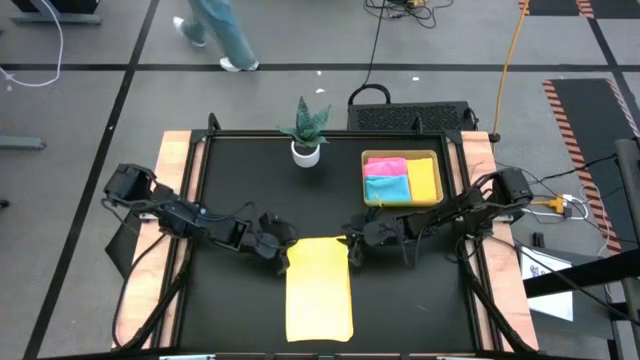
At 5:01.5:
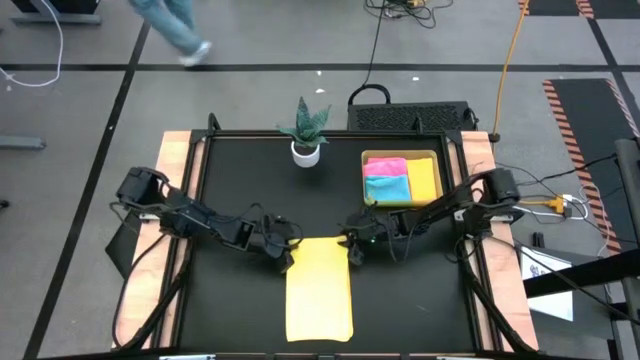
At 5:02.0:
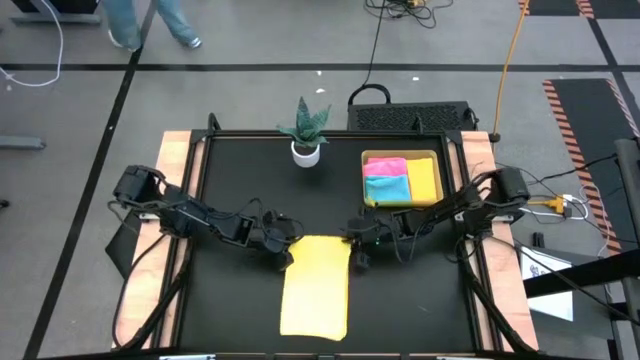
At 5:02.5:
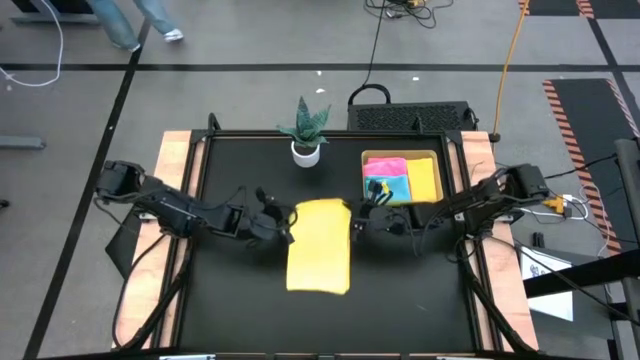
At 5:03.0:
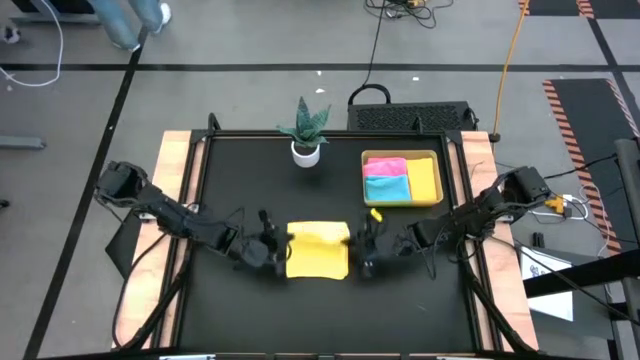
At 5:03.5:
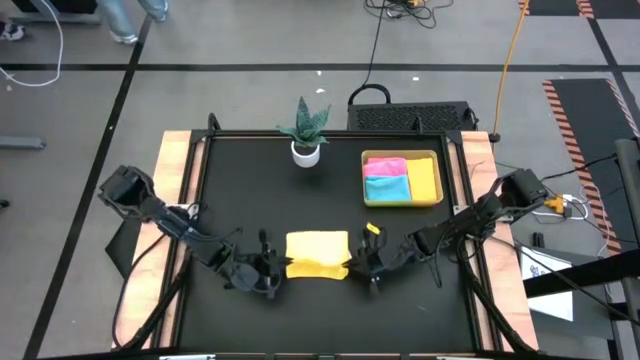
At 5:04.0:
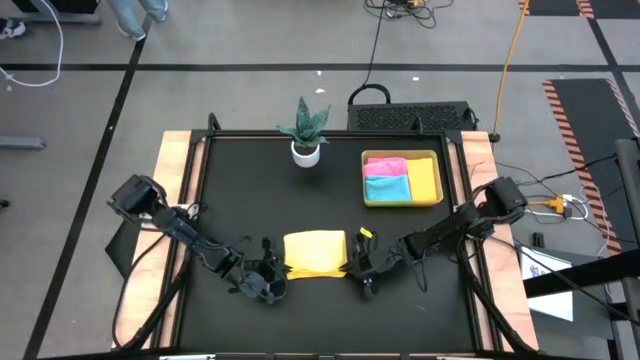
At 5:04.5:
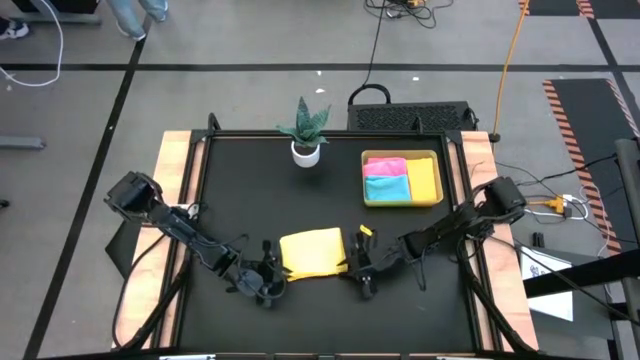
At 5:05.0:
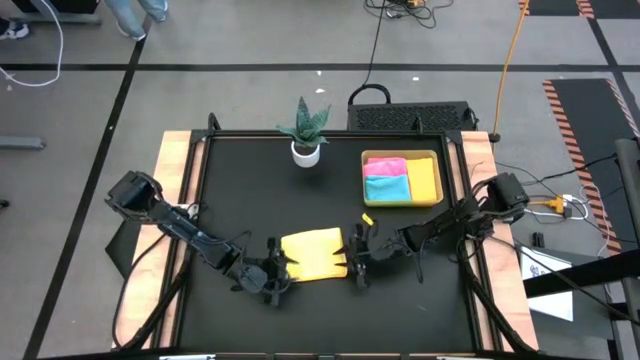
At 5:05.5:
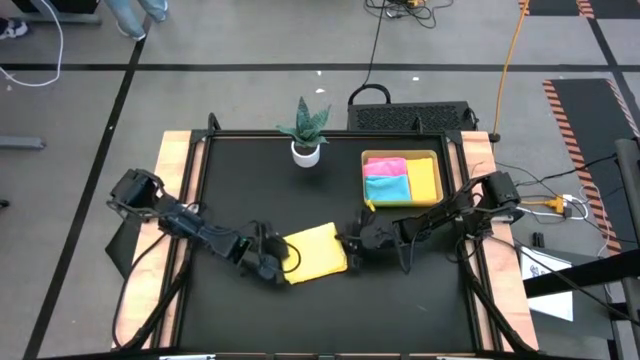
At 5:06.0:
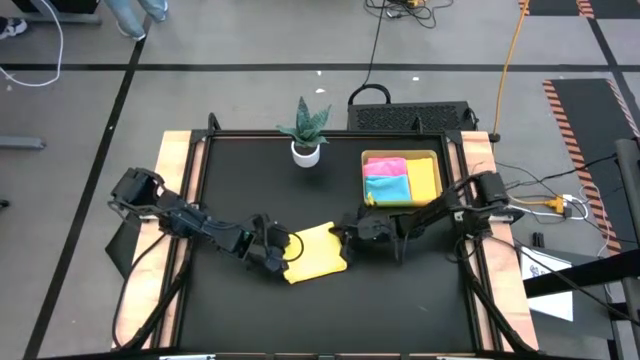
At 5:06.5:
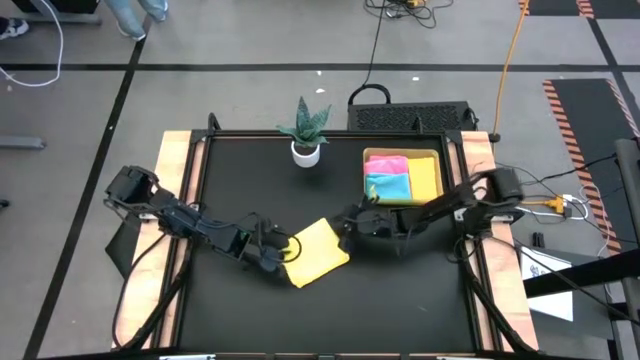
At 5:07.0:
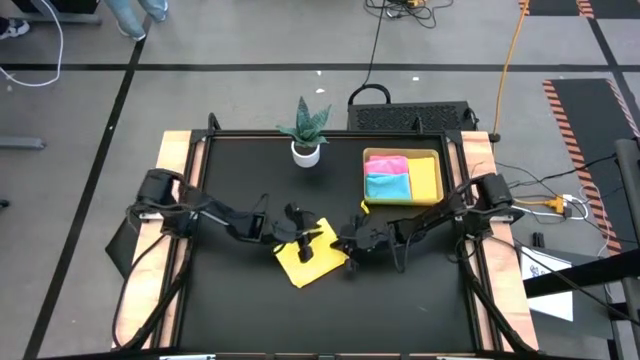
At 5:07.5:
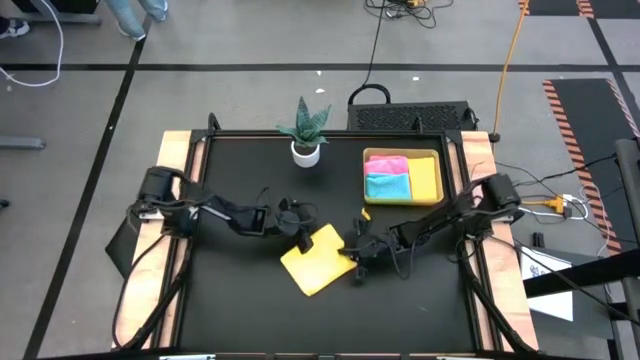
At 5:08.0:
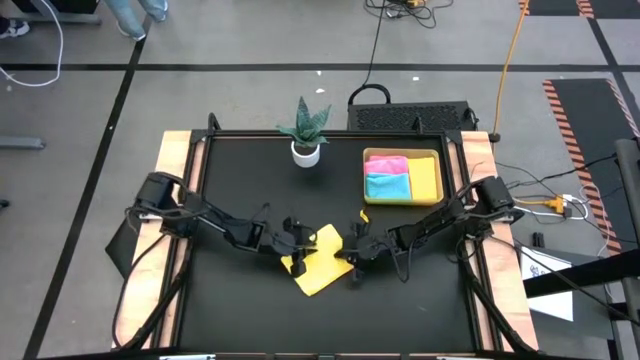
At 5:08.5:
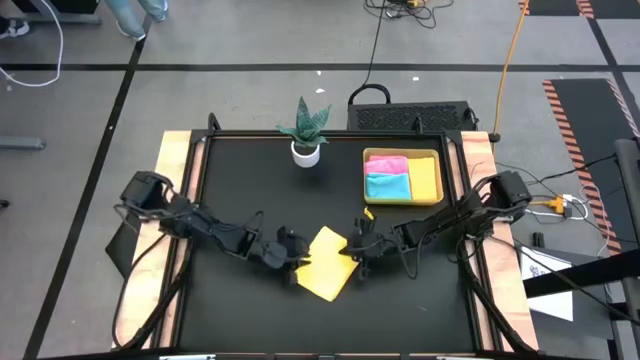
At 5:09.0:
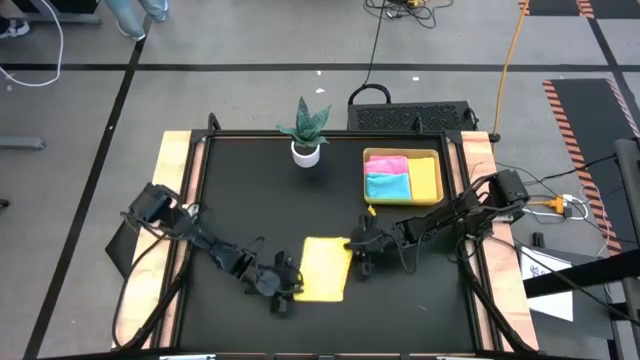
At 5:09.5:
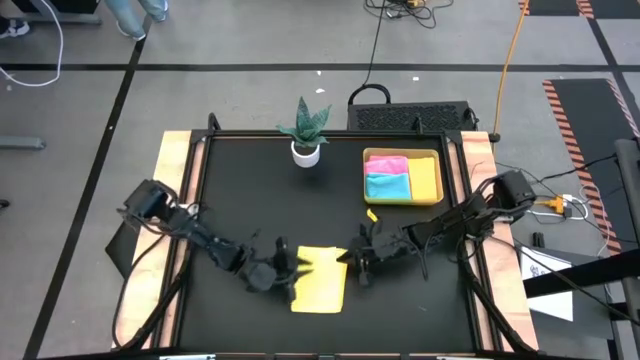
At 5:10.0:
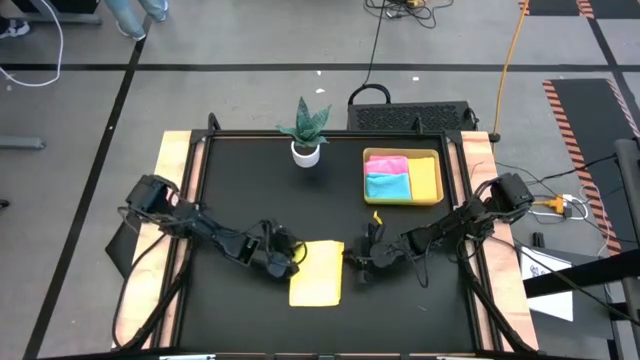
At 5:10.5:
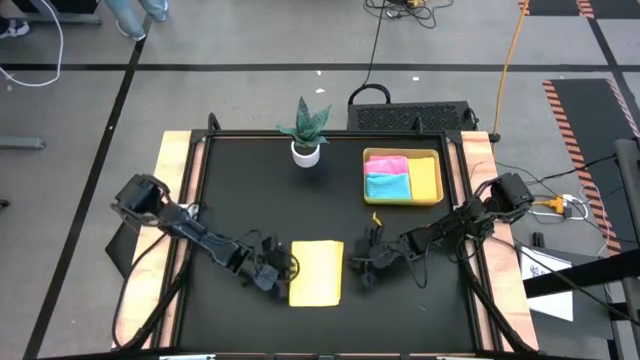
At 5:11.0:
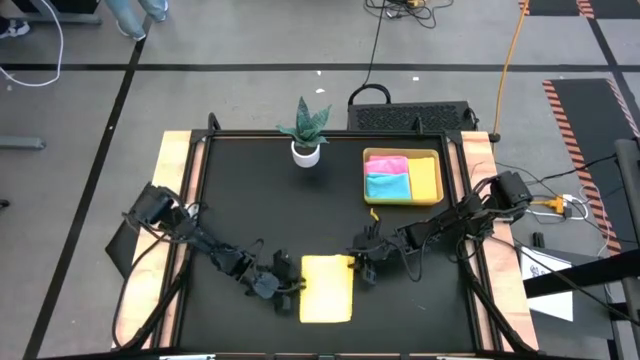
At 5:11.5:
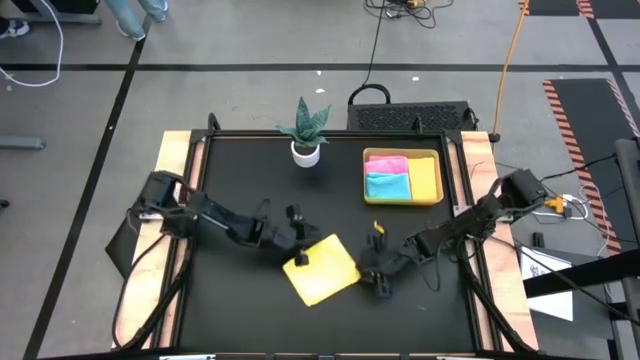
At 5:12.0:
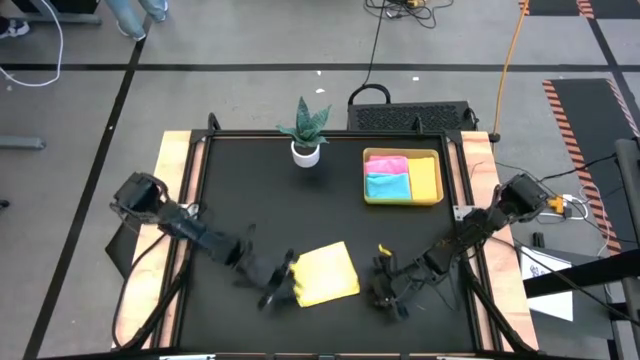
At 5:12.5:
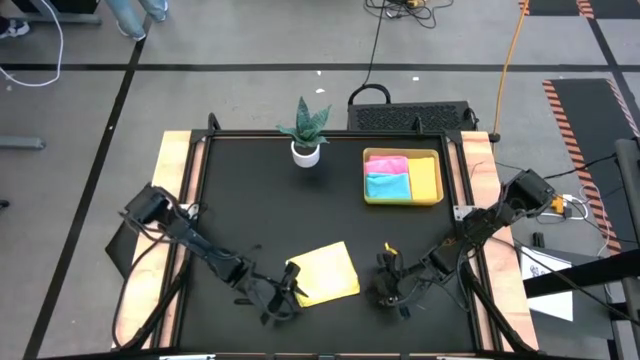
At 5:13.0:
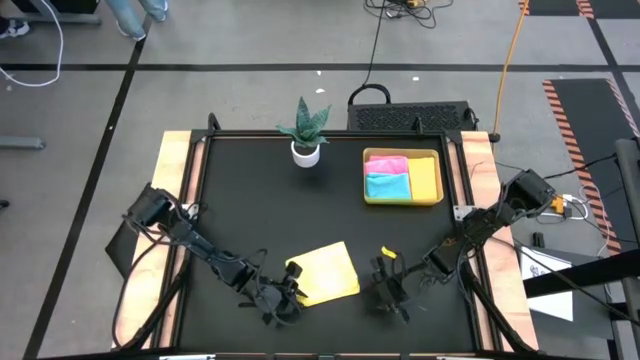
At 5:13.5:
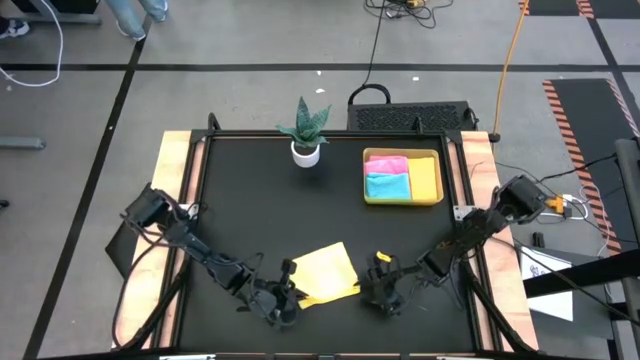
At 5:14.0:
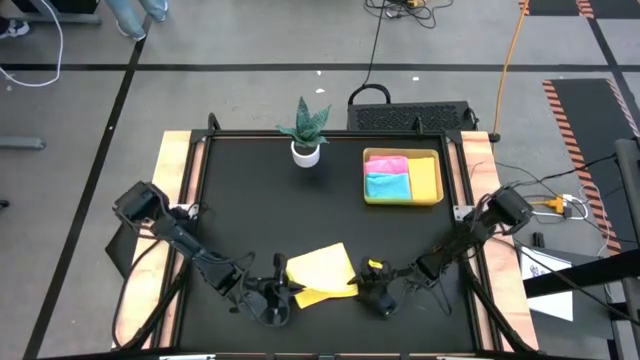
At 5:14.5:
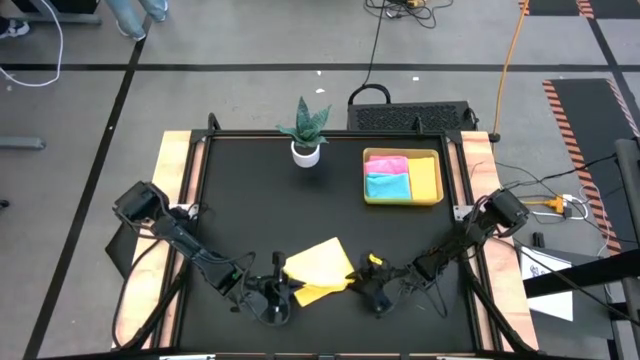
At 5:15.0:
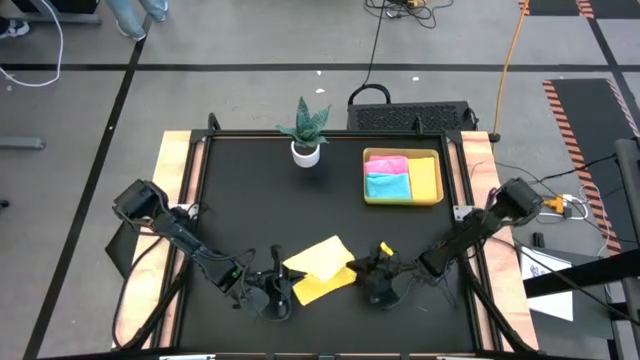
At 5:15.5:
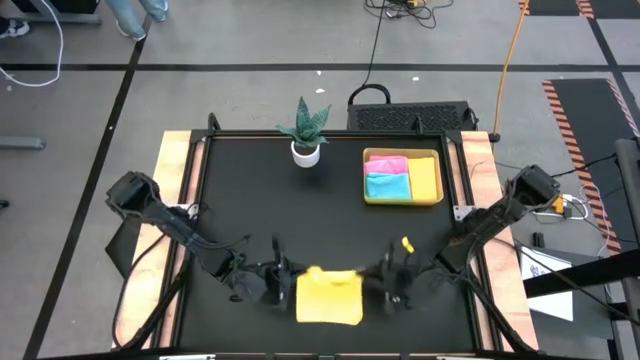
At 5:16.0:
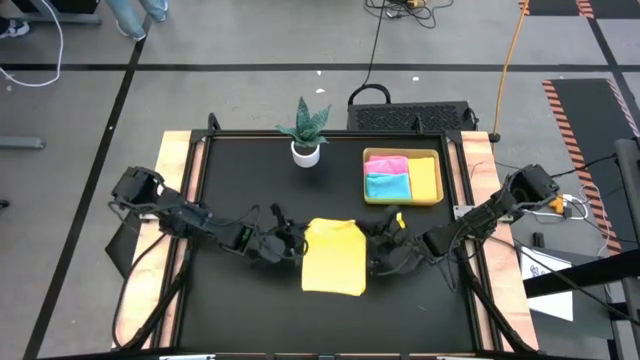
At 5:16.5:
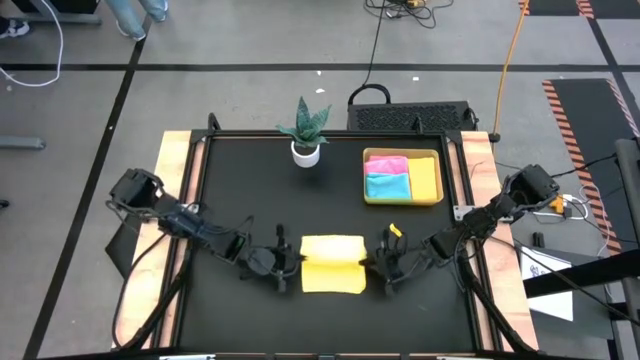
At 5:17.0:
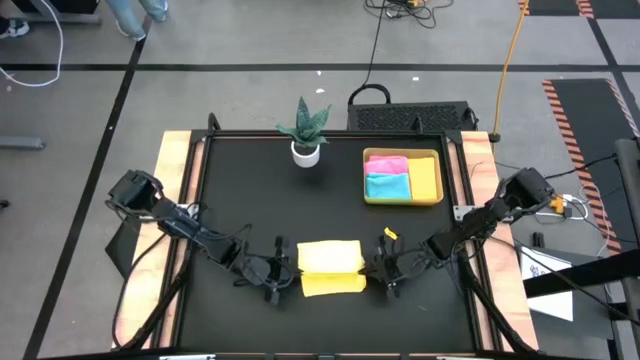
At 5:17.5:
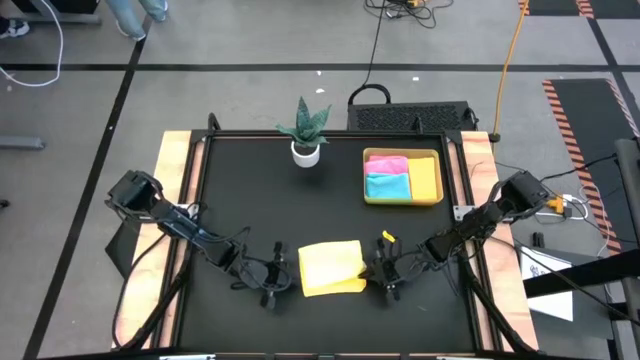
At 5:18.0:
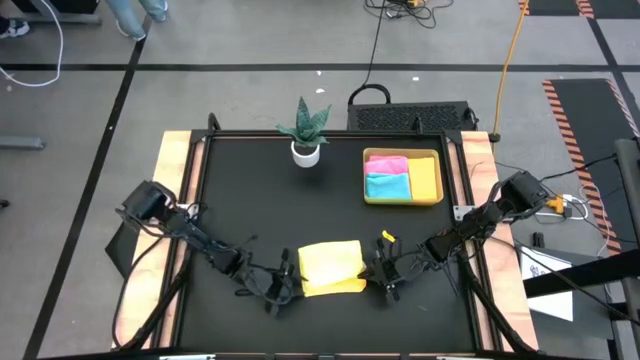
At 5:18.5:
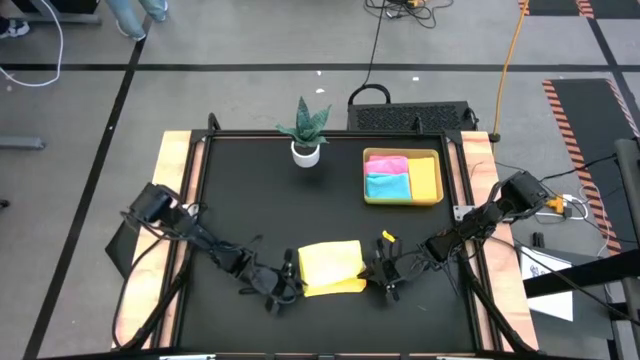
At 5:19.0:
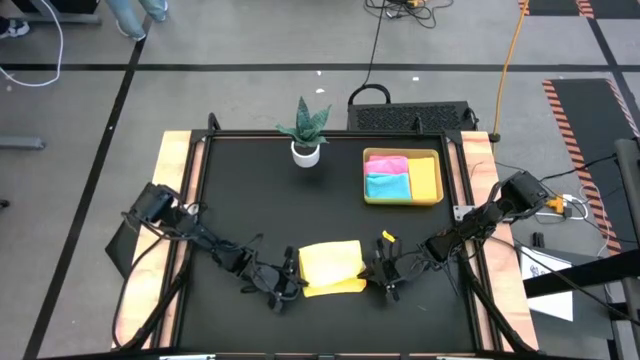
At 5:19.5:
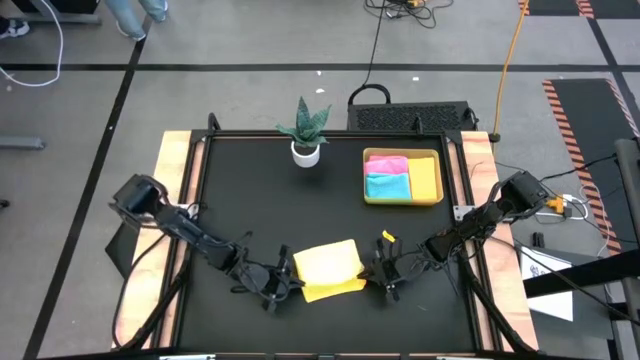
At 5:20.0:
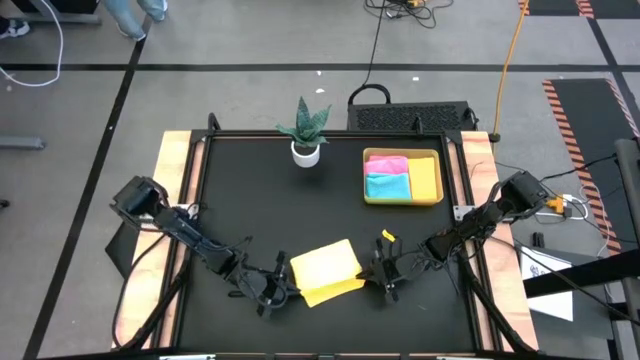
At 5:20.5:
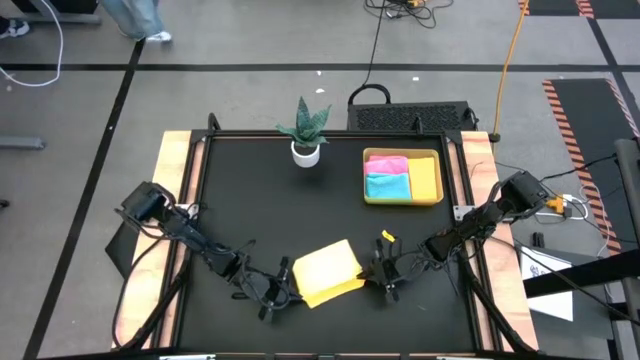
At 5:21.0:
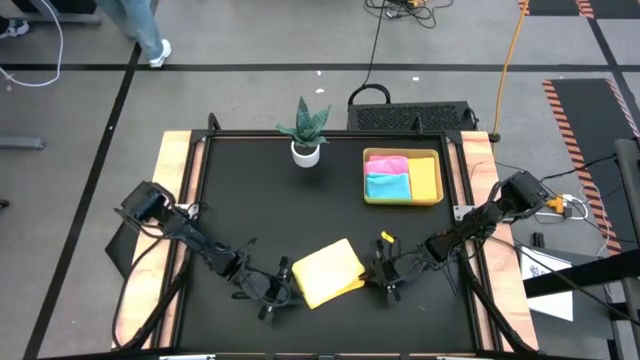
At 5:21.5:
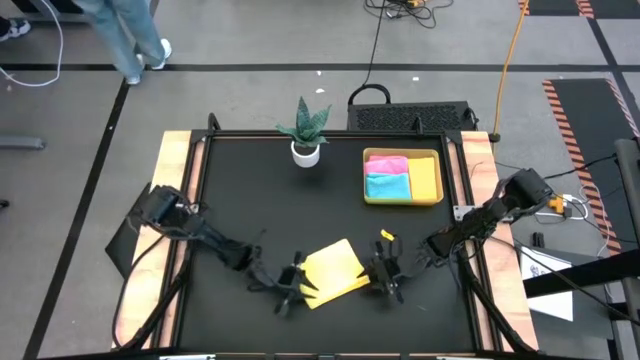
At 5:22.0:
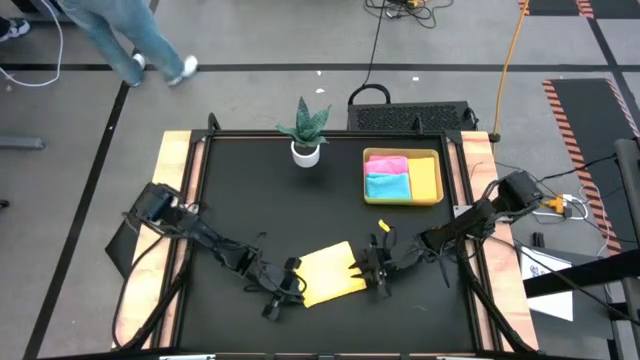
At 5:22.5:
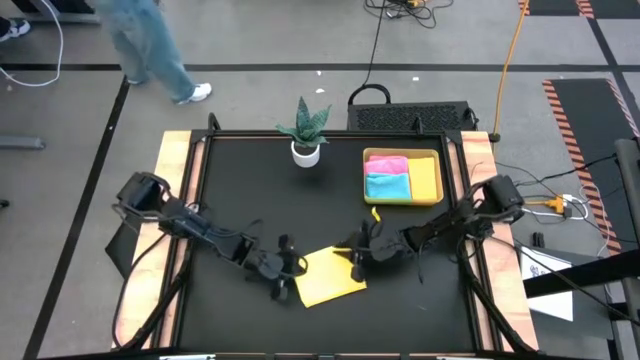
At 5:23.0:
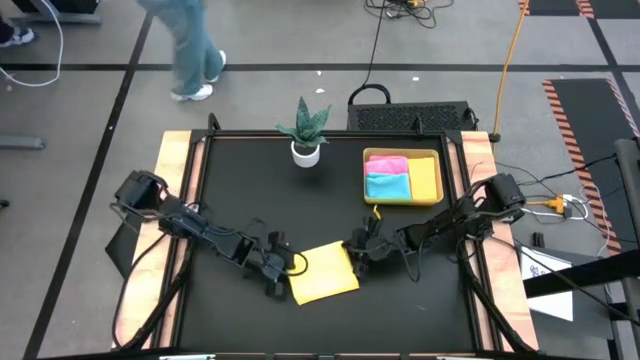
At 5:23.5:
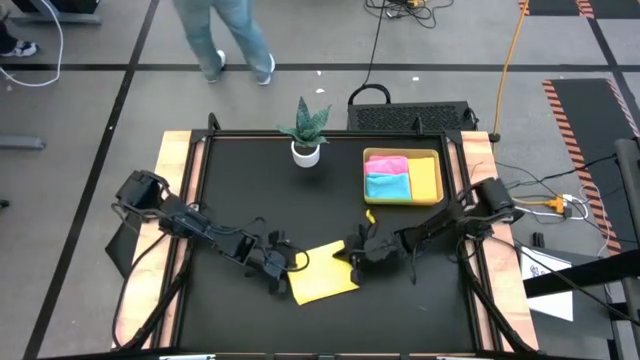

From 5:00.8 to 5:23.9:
Task: Fold microfiber towels
Fold the yellow microfiber cloth
